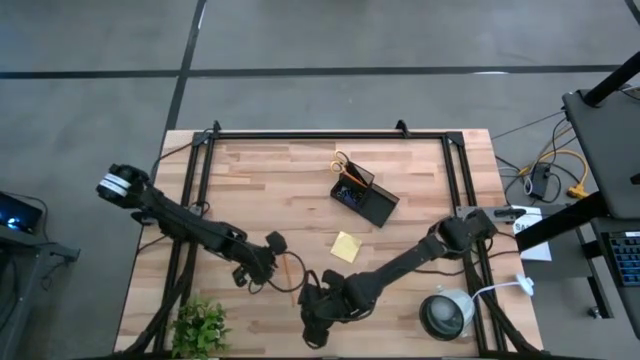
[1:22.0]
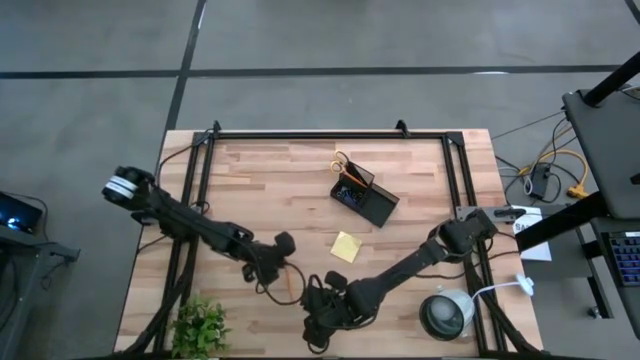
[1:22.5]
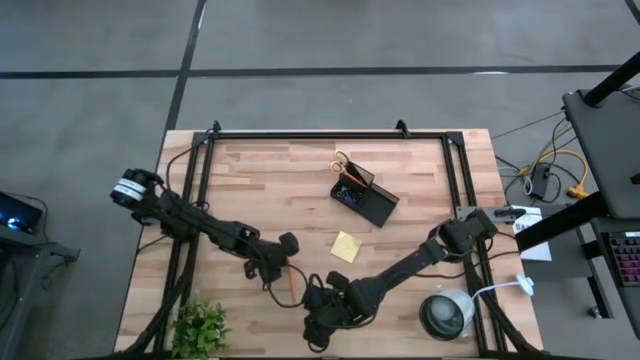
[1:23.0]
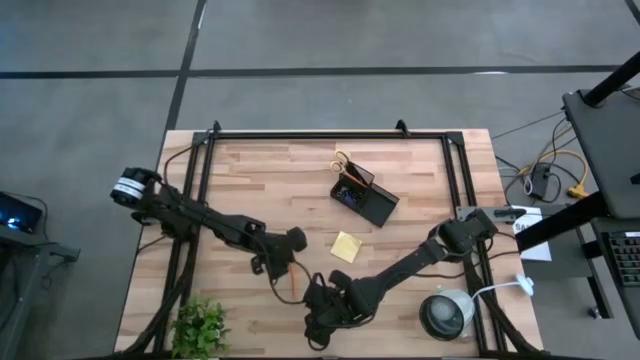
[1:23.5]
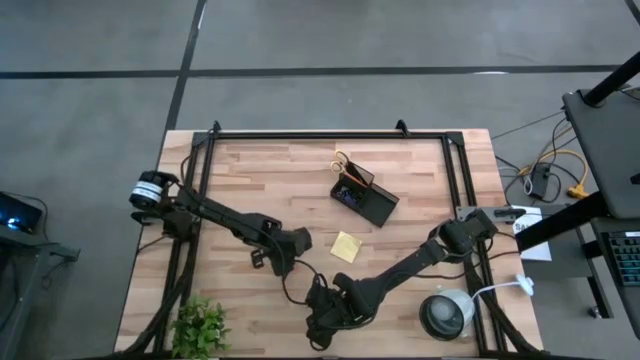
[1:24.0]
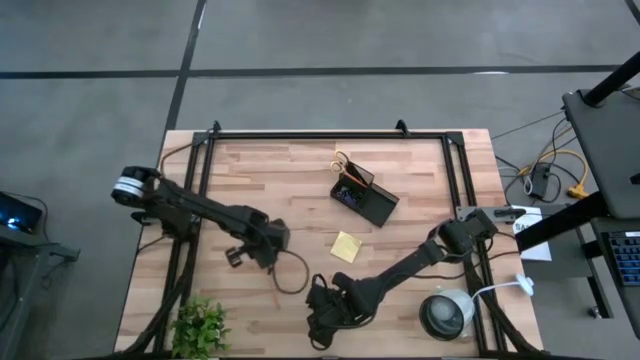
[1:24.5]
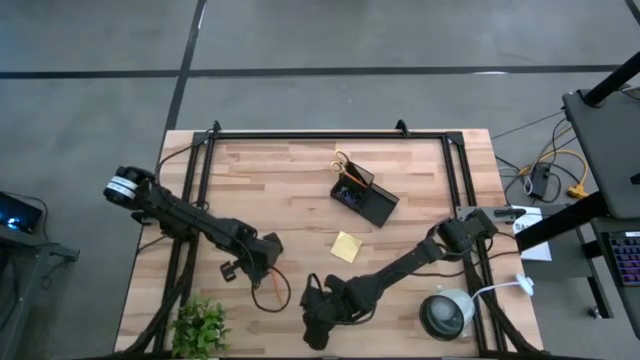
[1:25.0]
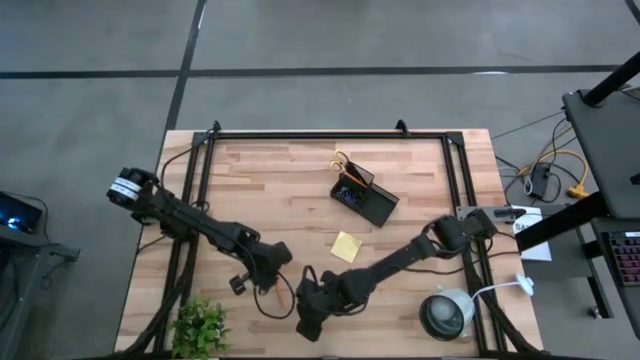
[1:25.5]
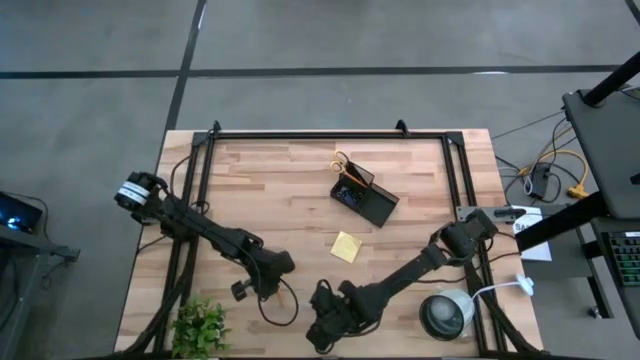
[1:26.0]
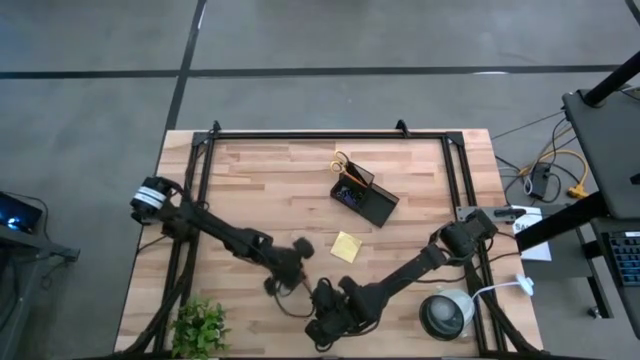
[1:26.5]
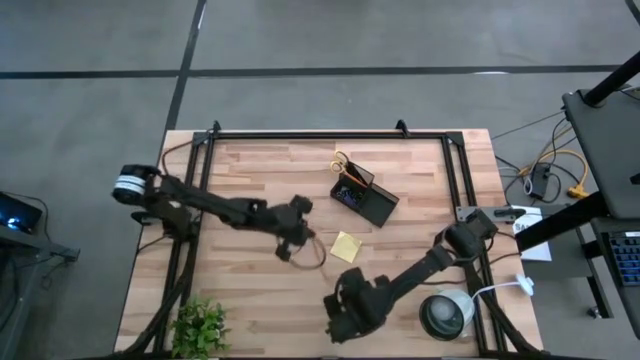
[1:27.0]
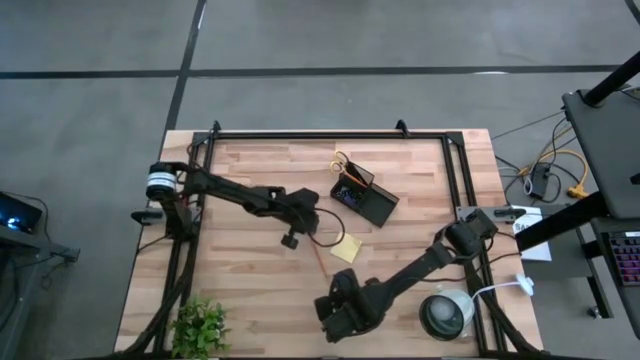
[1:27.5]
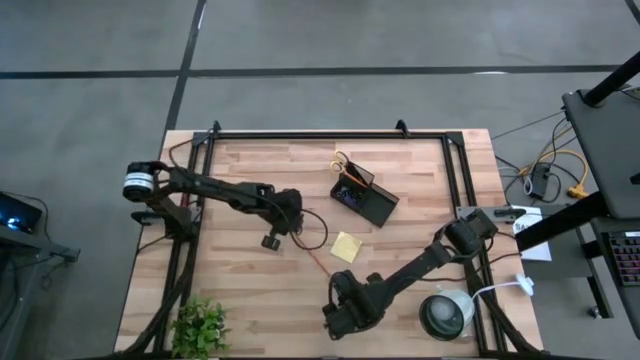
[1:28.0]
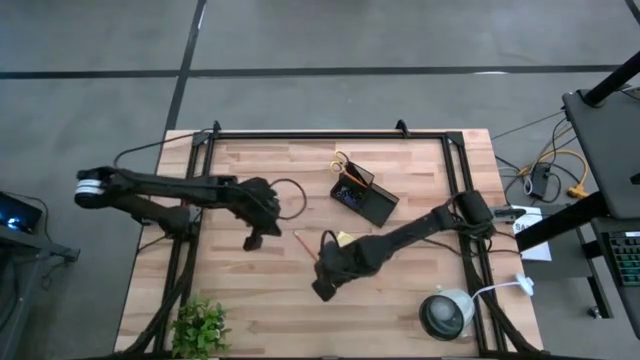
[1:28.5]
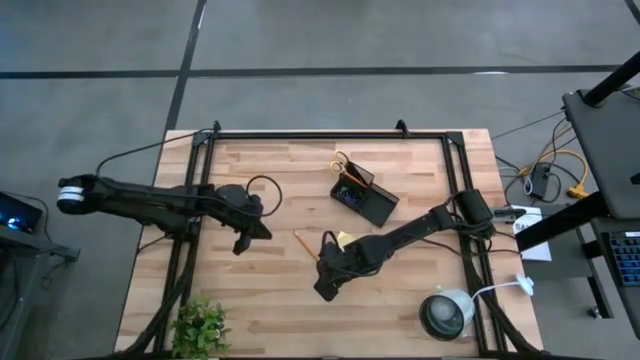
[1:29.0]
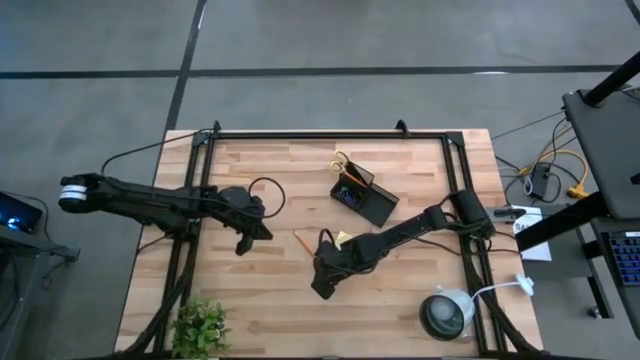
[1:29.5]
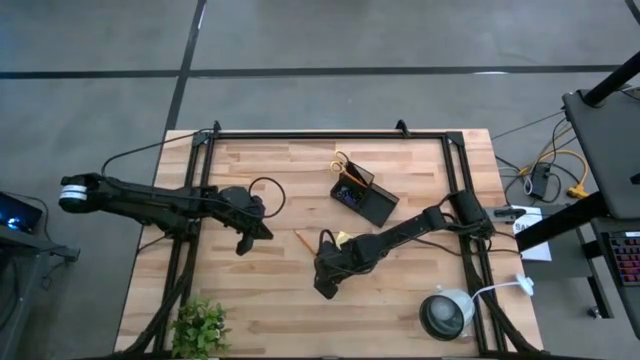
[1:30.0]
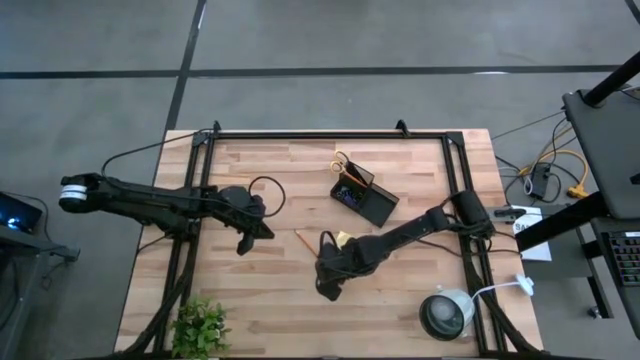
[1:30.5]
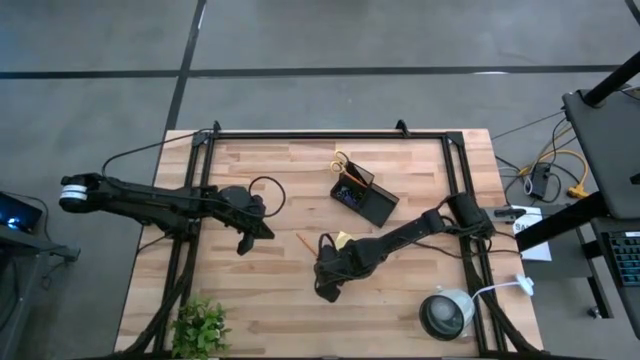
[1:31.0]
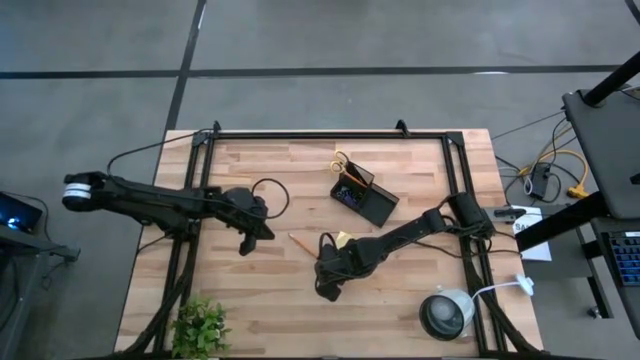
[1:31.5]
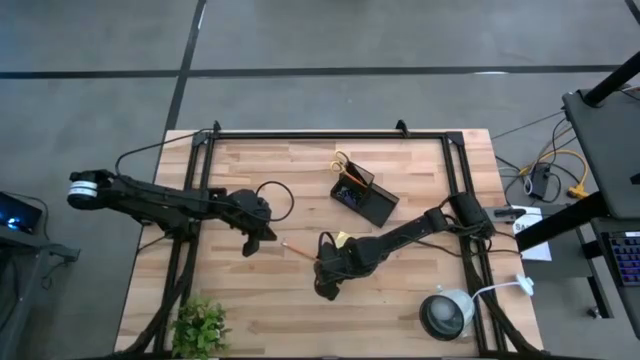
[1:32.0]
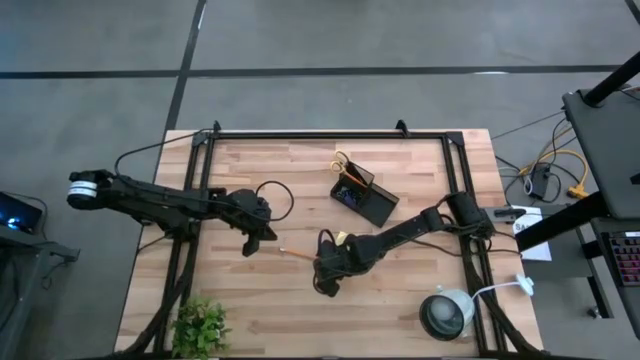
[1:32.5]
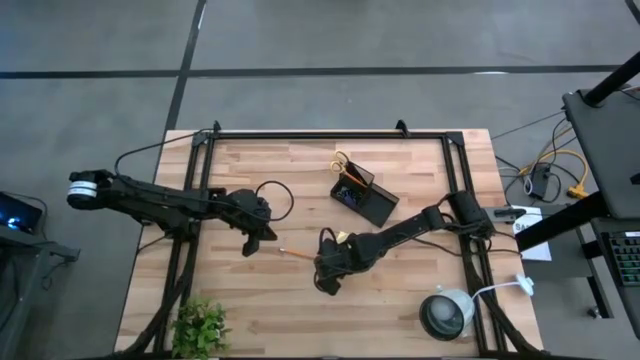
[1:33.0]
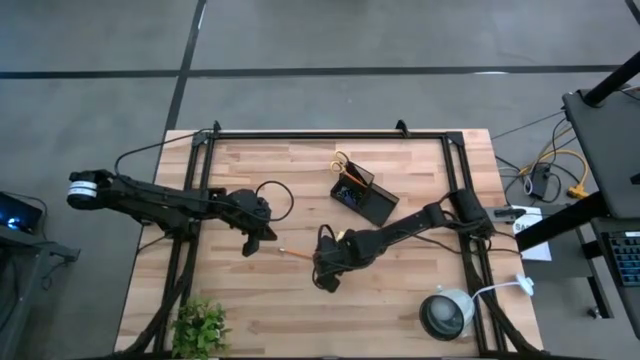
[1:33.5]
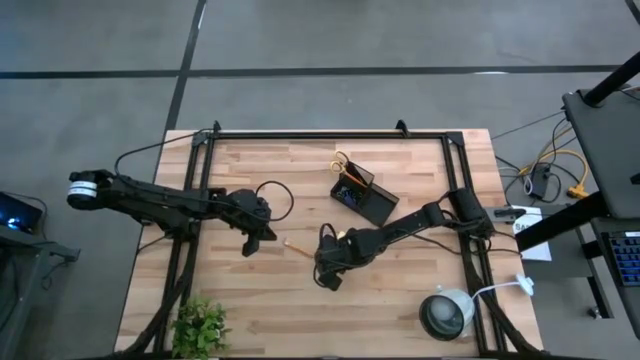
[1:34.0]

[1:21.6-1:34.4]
Task: Pick and place office supplies into organizer
Put the yellow pencil into the black desk organizer

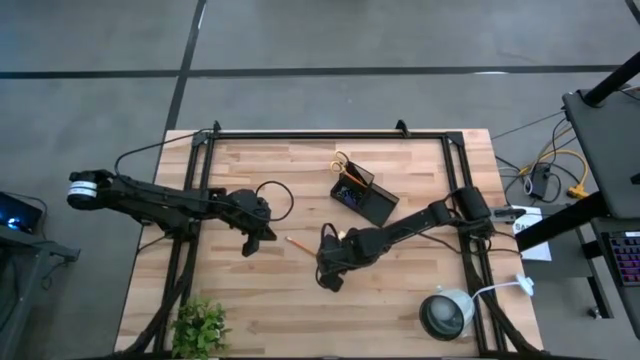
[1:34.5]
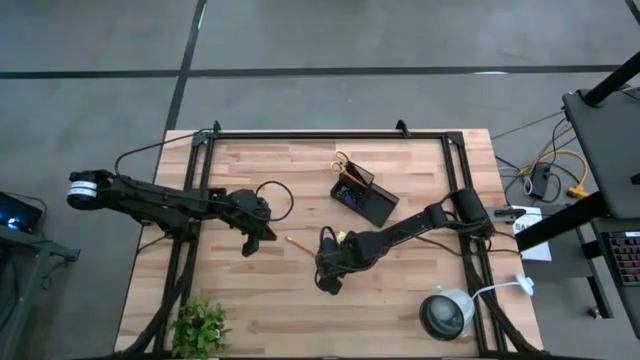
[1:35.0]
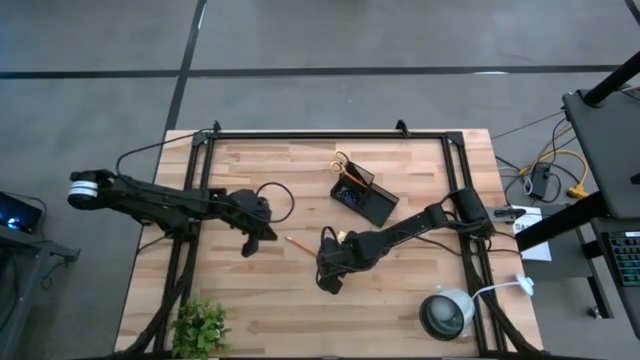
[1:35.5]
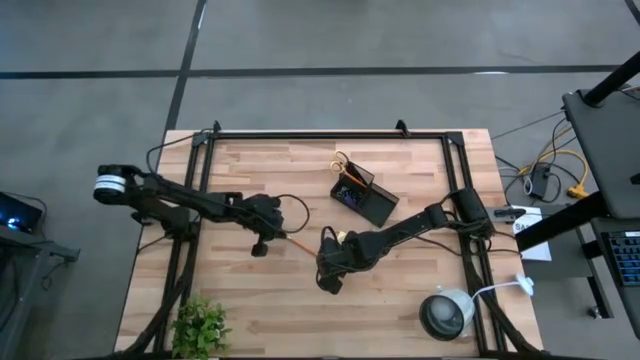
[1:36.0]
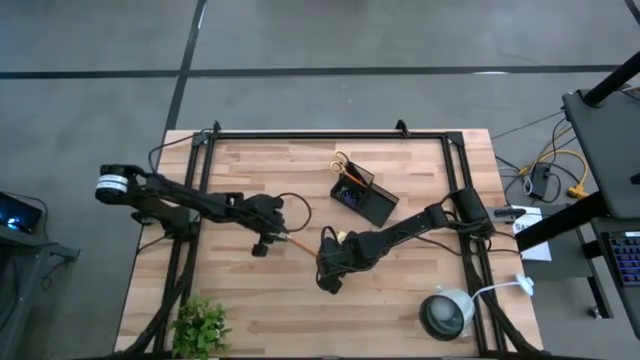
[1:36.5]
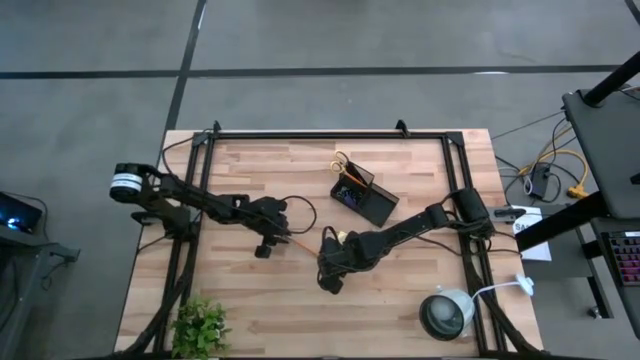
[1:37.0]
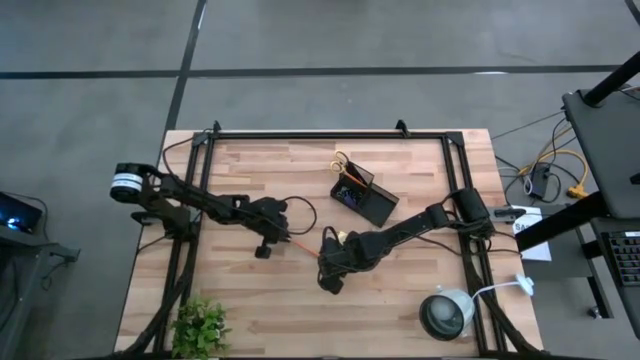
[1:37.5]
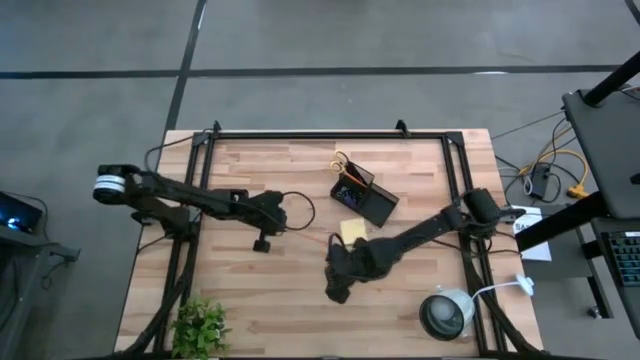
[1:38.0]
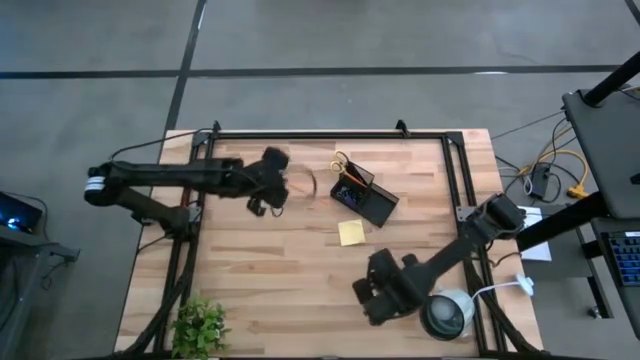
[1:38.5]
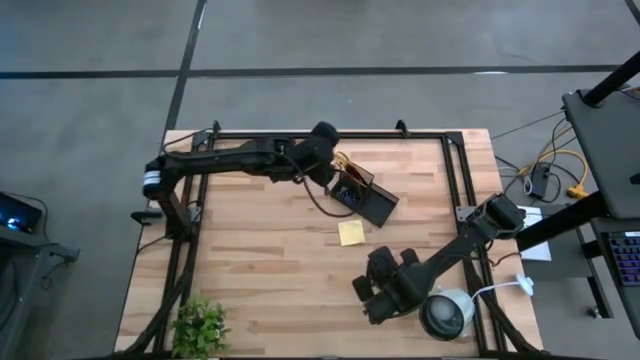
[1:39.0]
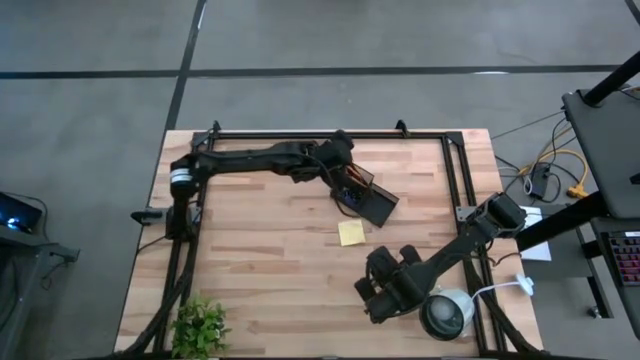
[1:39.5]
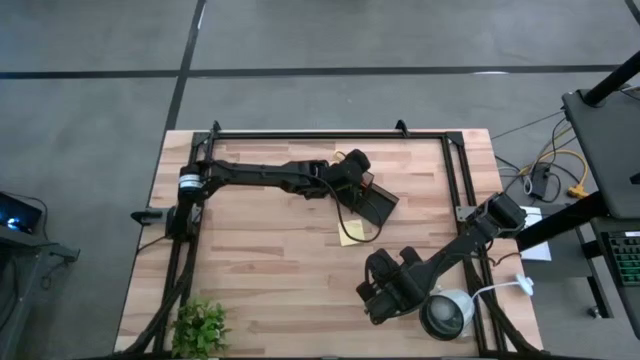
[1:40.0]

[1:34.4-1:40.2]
Put the yellow pencil into the black desk organizer

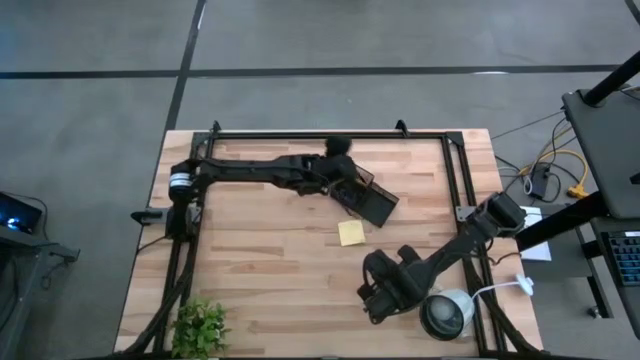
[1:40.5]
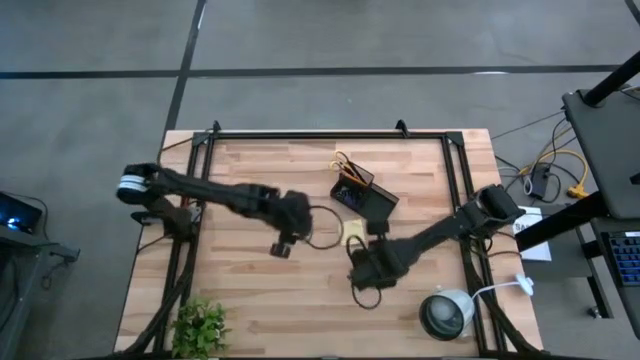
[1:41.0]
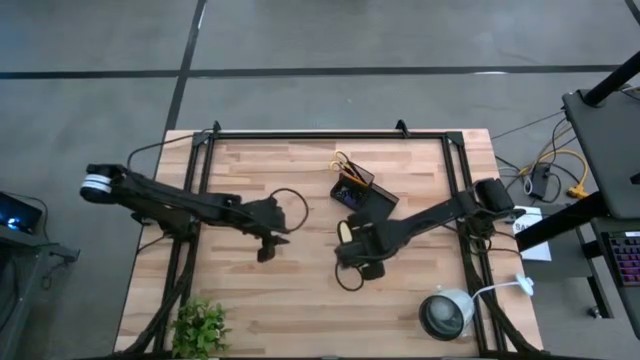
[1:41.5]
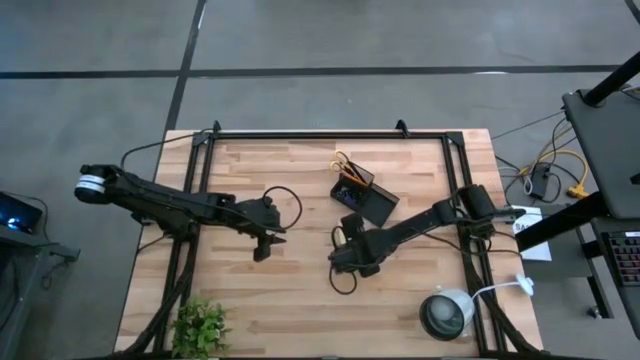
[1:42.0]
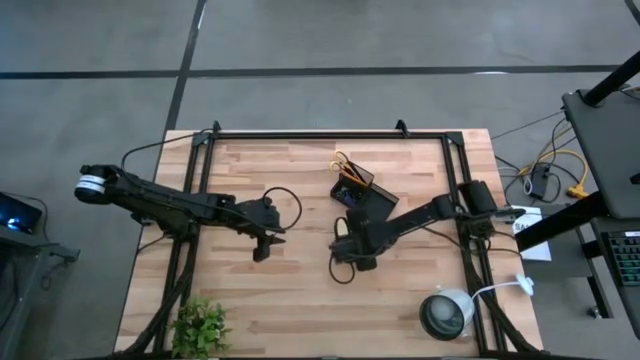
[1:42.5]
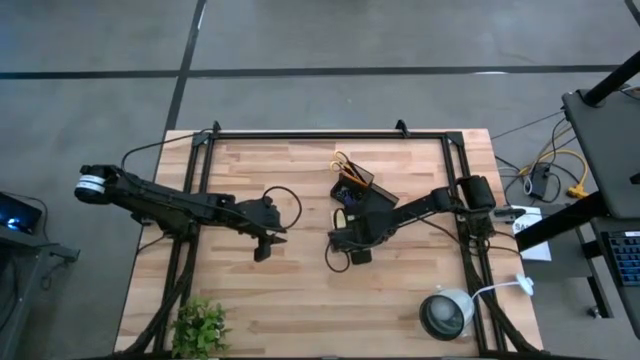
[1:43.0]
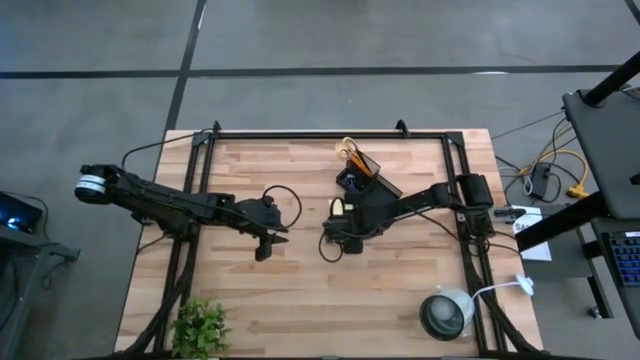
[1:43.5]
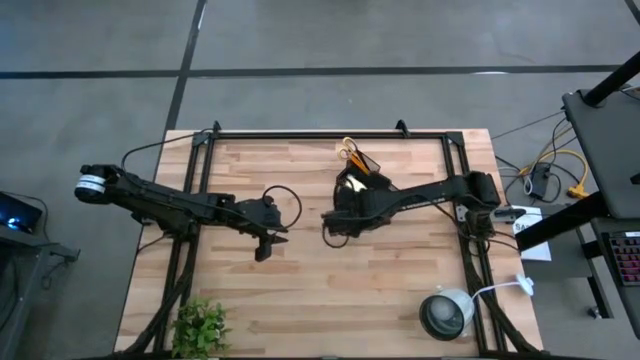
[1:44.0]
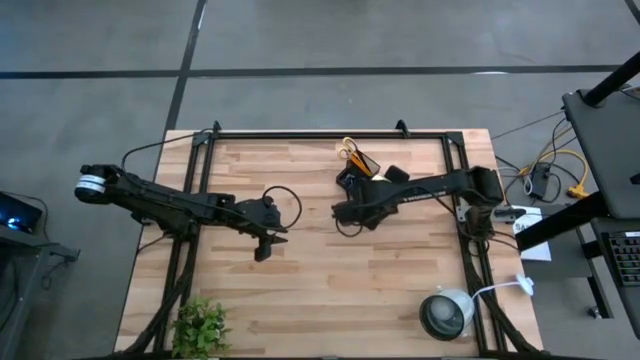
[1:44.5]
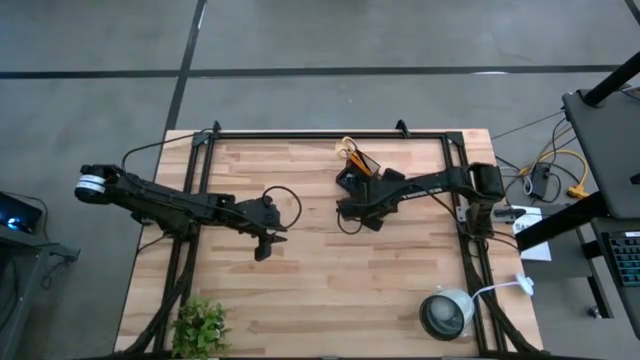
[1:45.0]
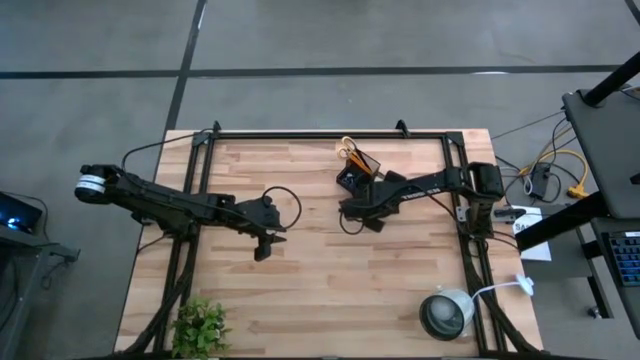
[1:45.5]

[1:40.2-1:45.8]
Put the yellow sticky notes into the black desk organizer
